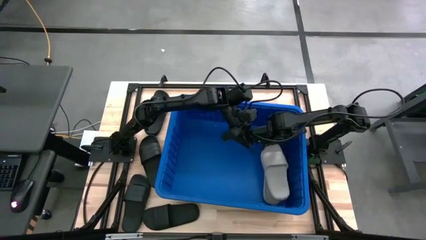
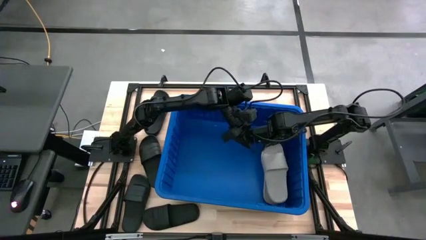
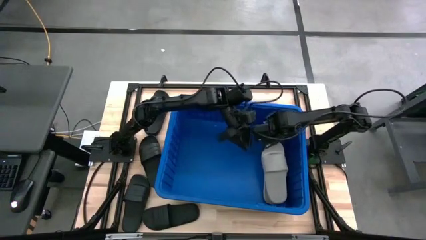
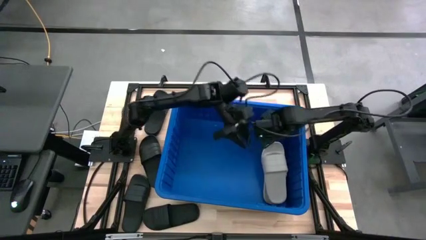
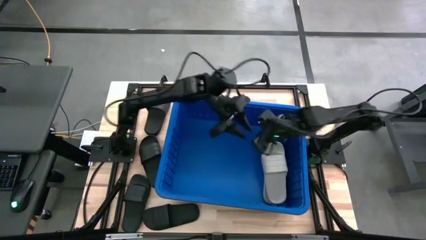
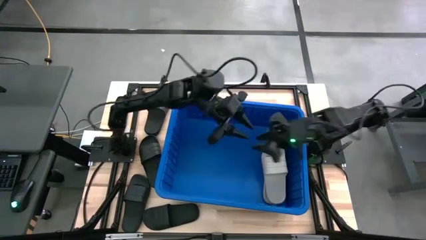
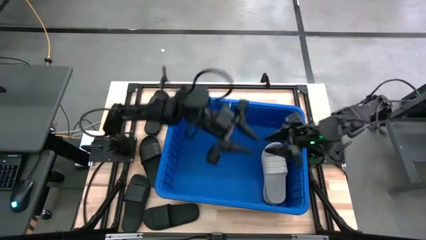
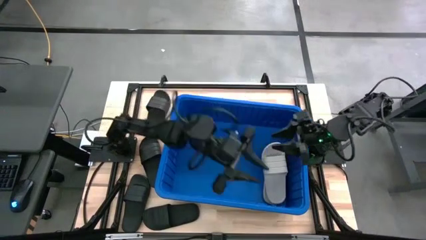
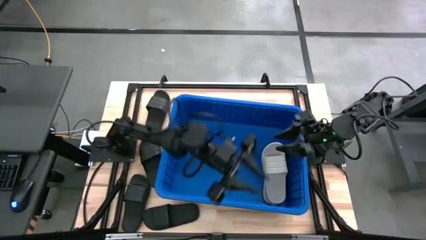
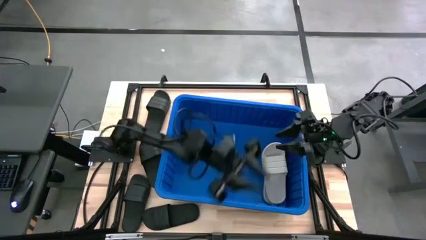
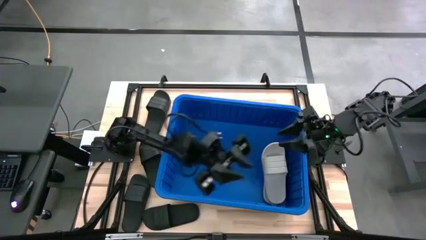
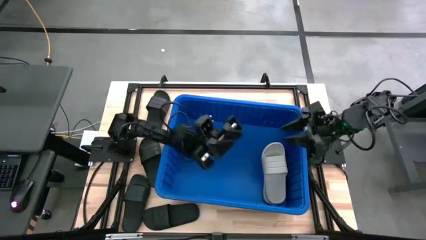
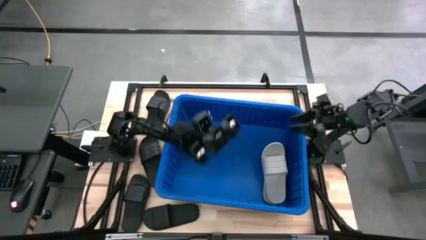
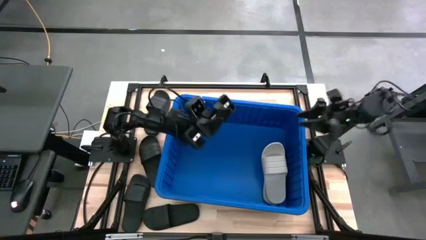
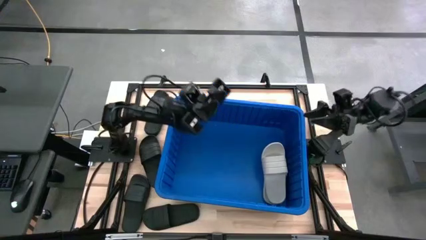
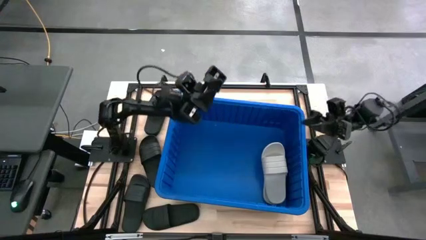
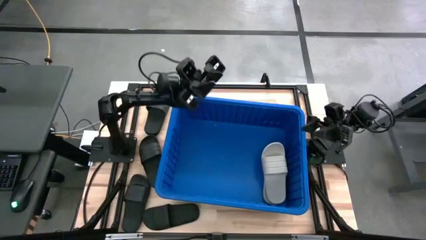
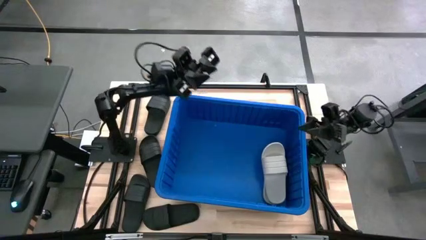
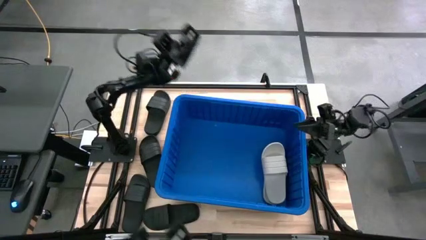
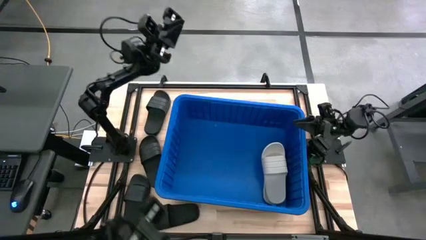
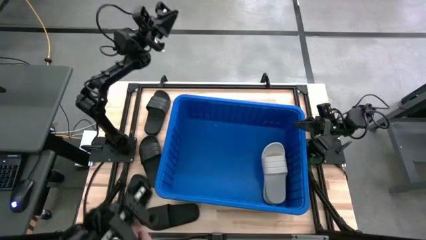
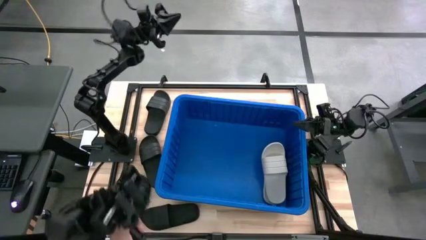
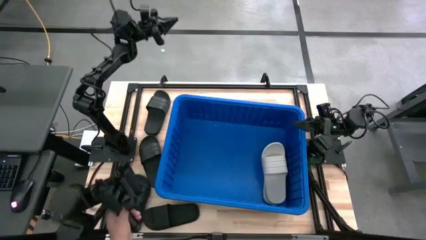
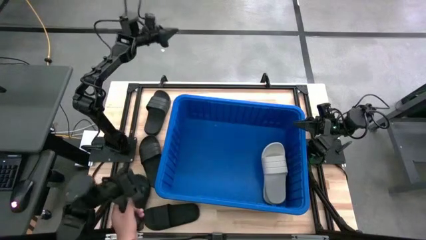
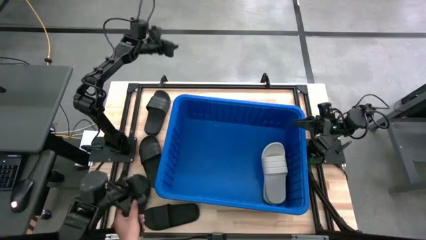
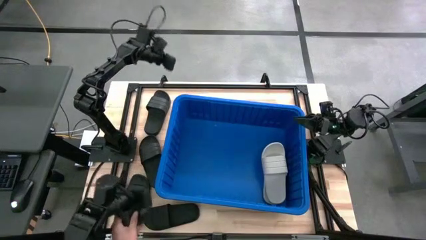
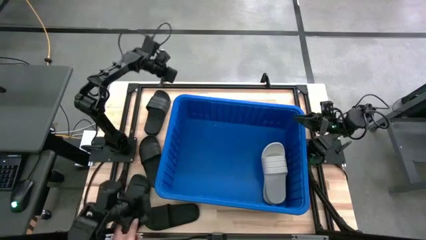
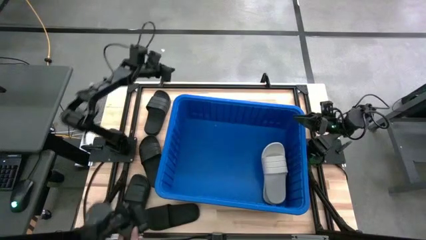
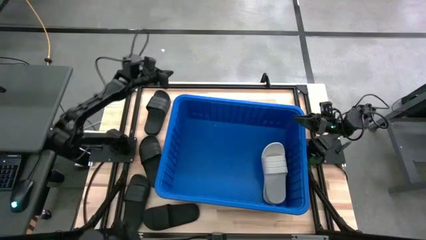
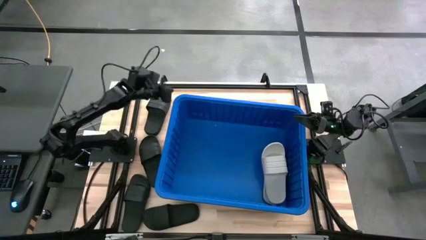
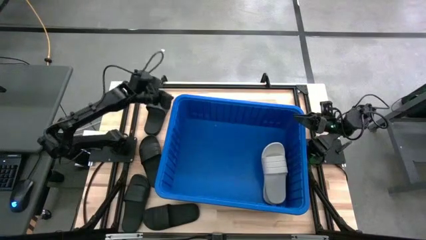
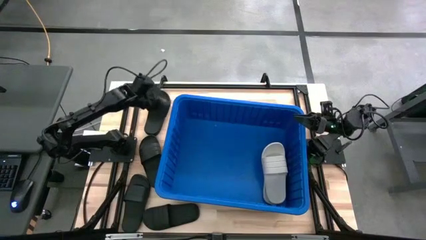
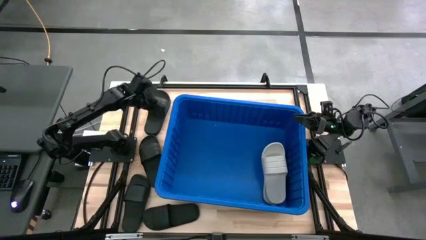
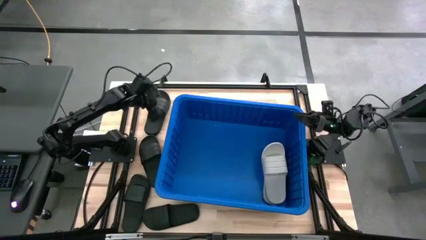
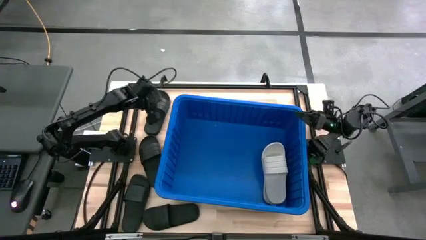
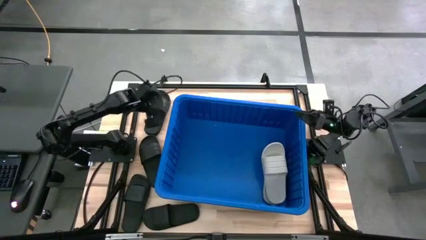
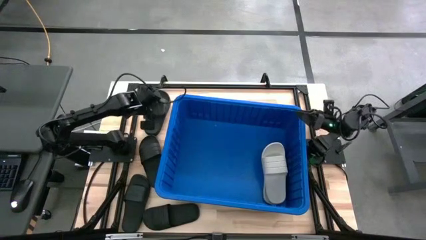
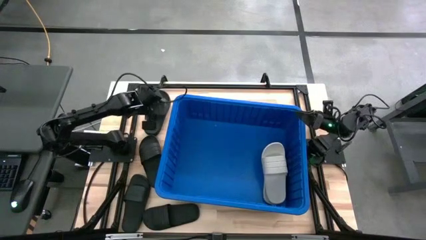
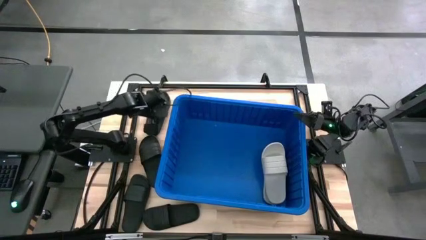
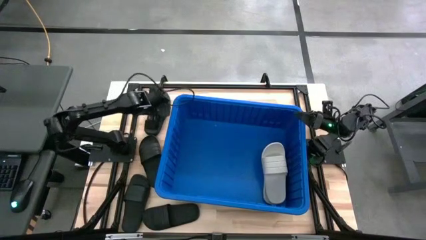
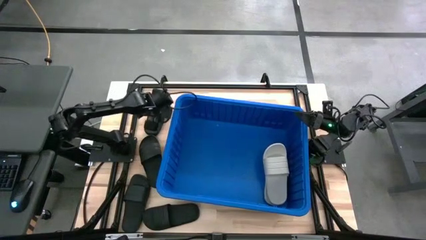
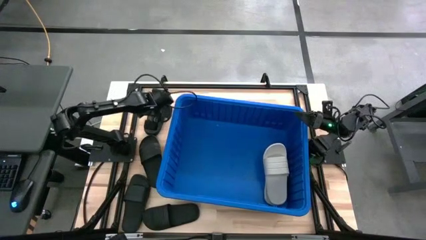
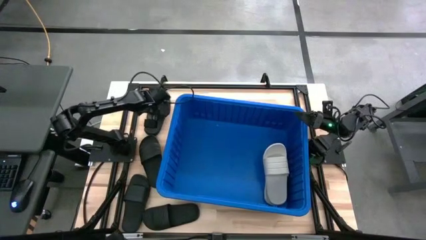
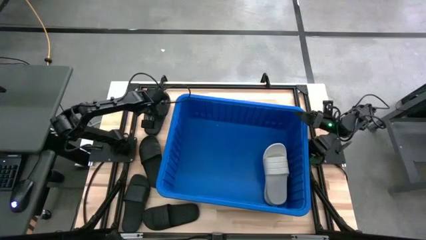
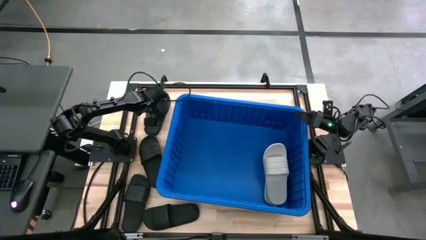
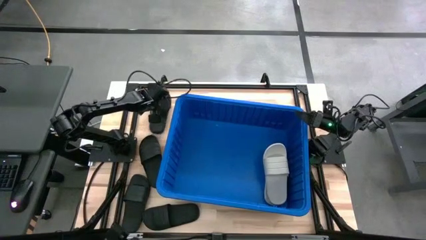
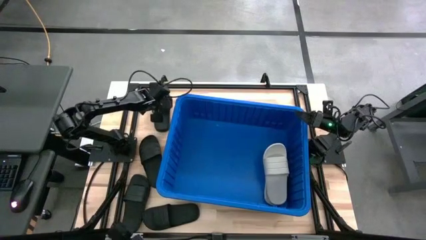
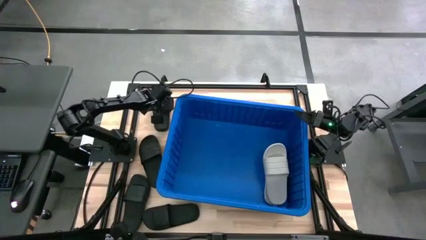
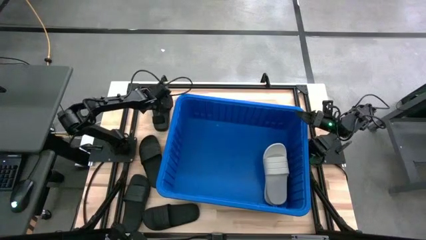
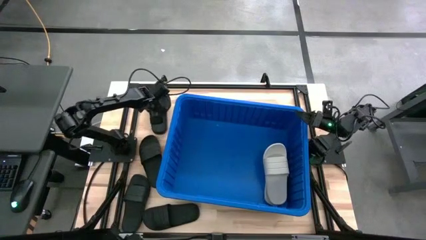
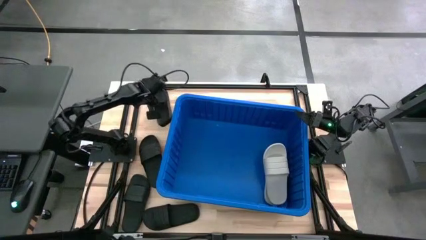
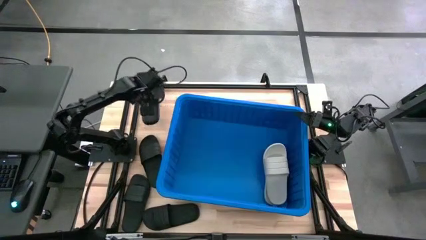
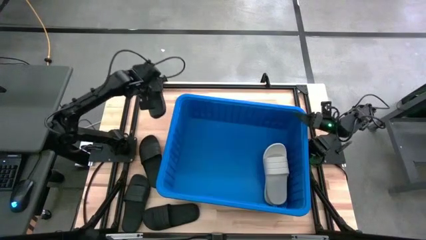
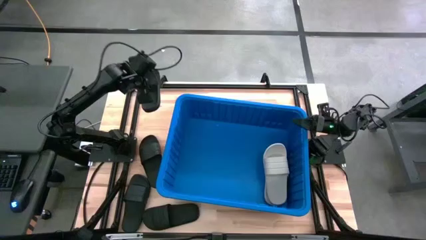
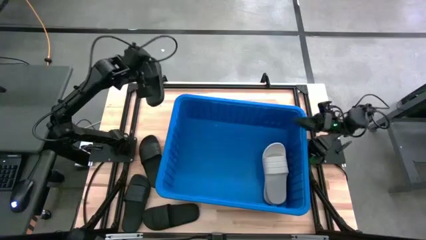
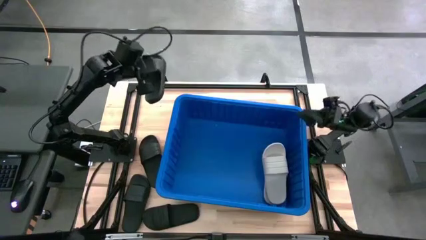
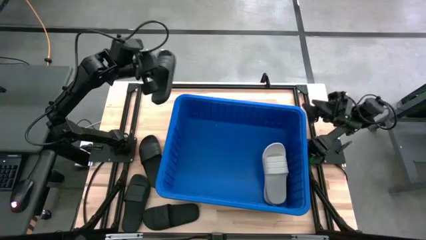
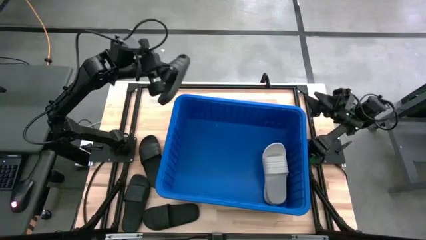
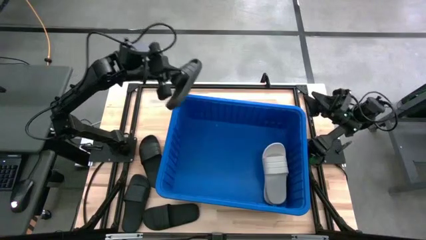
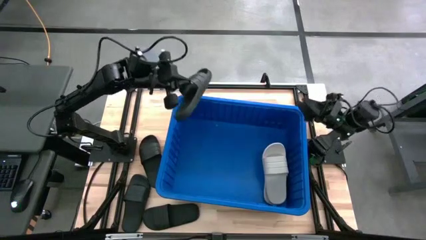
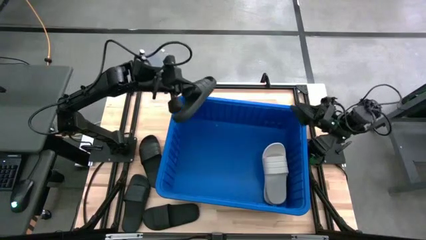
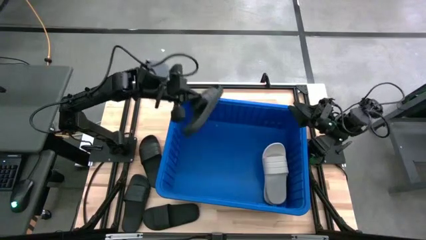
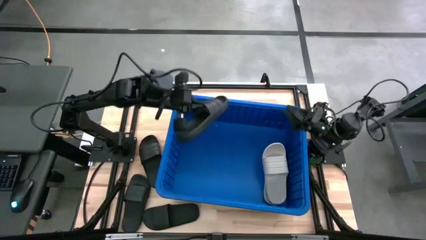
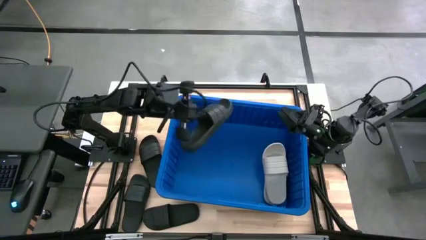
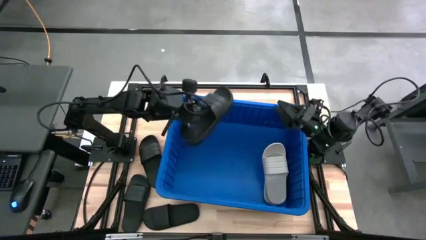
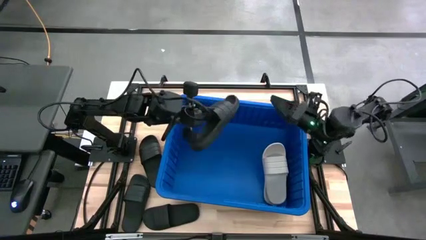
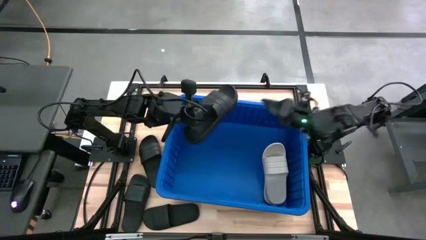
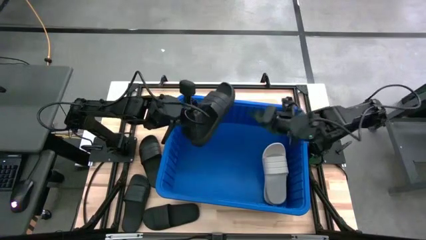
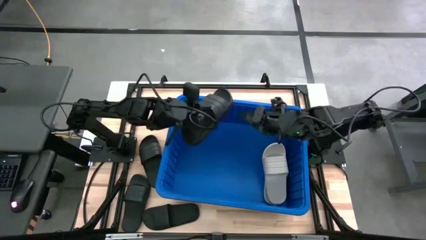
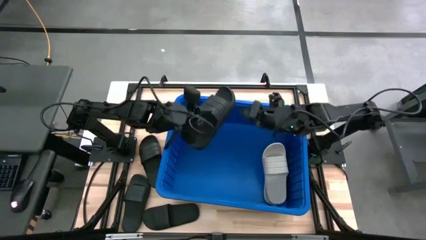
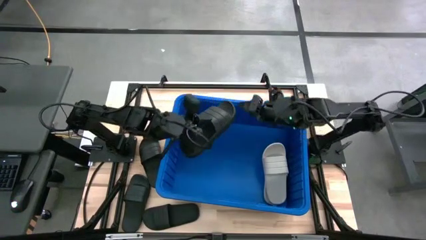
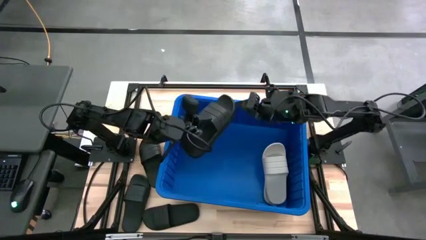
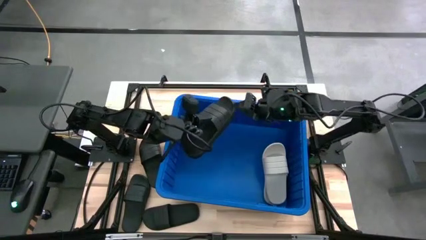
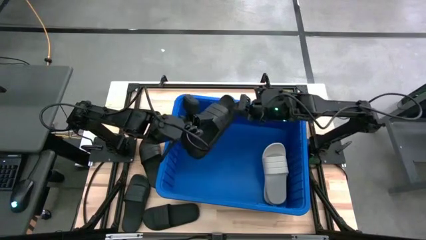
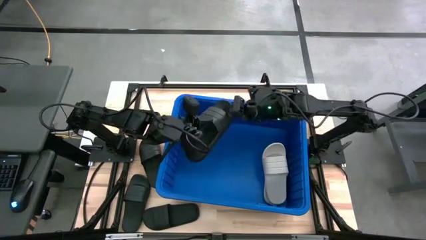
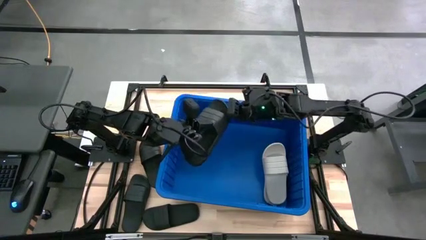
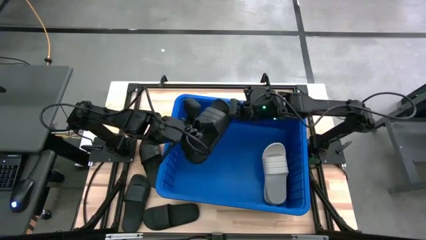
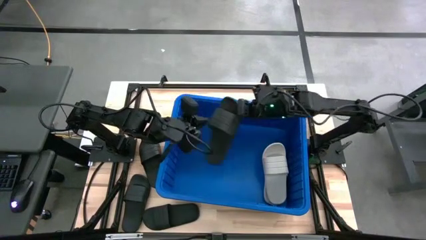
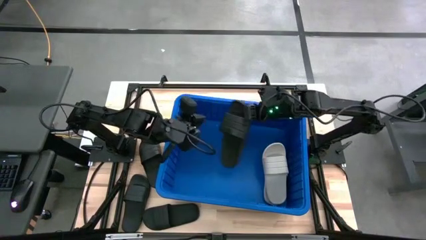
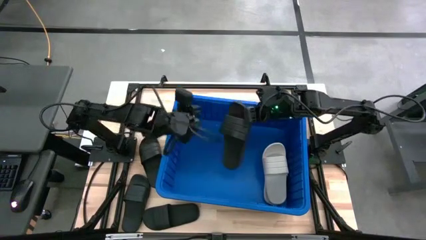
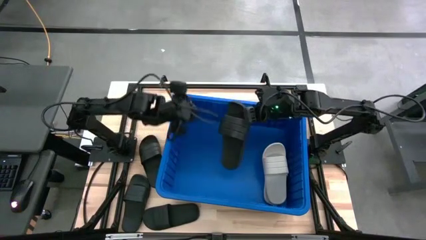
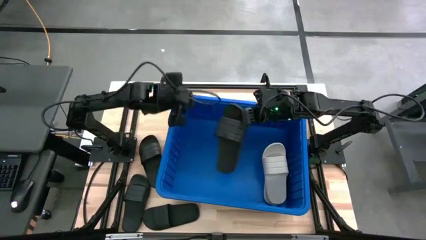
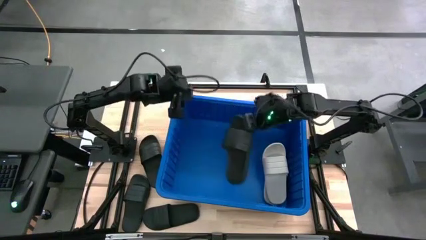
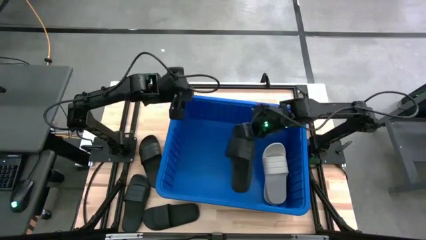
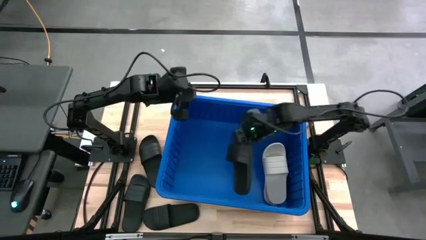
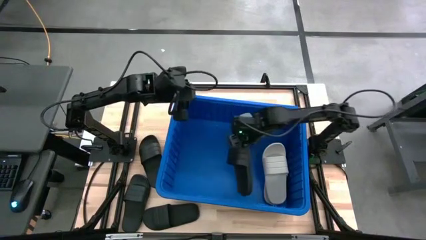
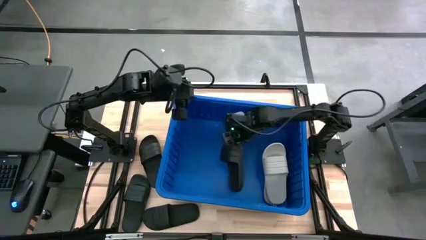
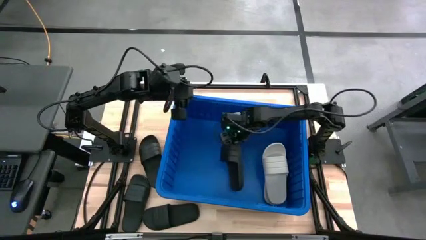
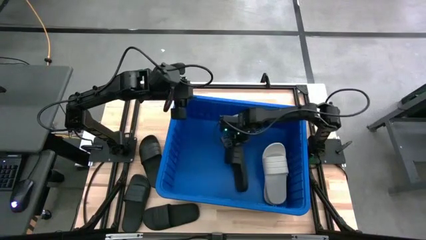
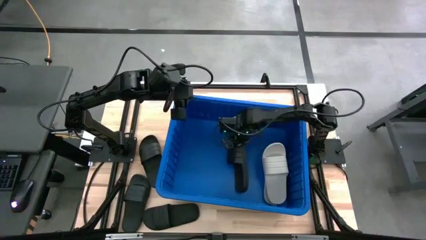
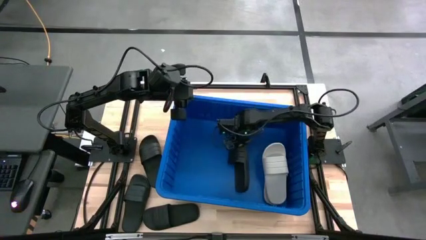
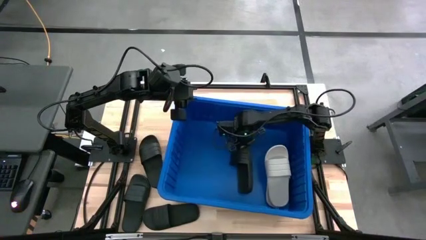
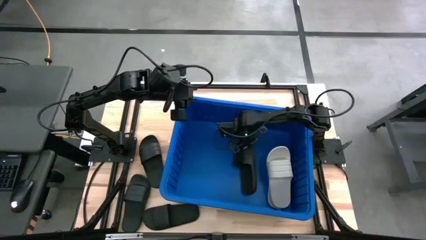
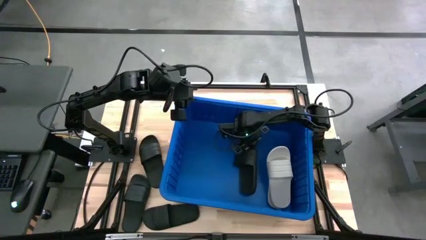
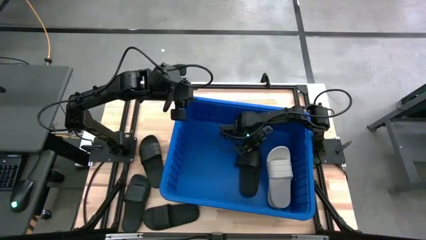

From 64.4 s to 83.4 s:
Task: Pick and place slides into bin
Put the black slide into the blue organizer bin
